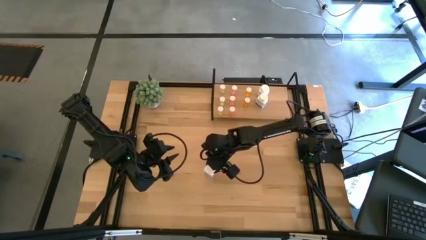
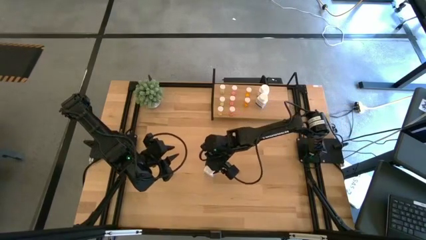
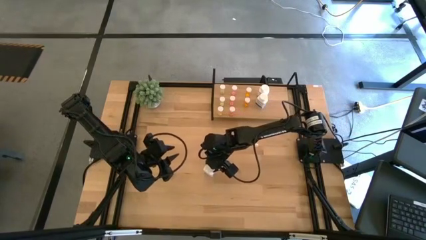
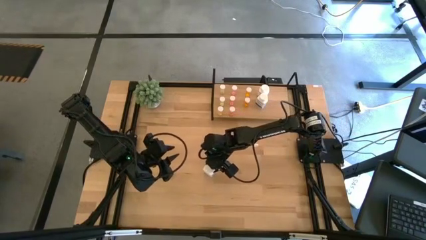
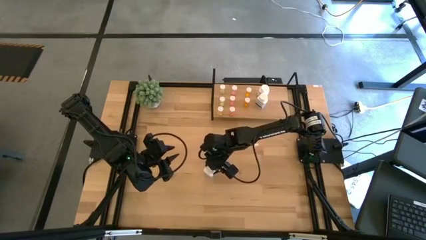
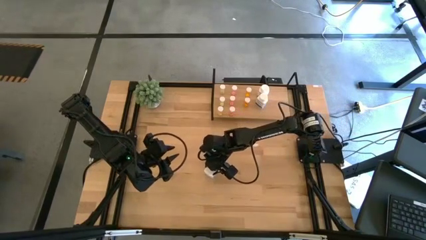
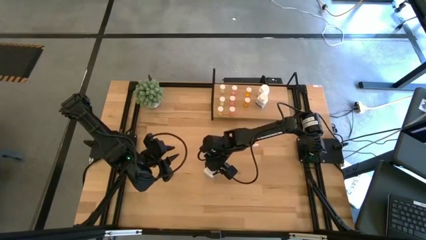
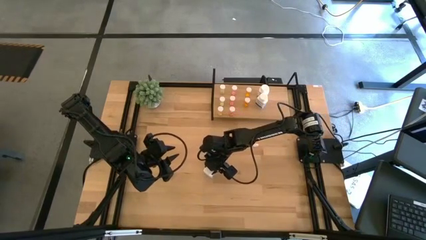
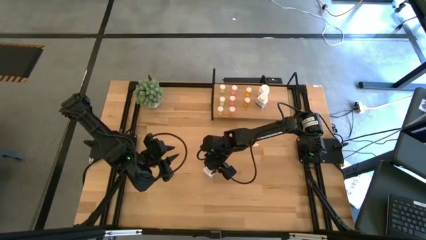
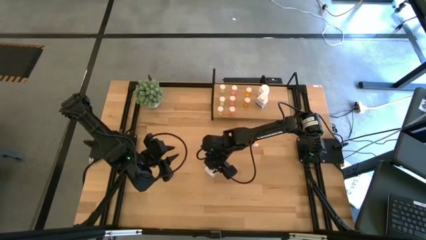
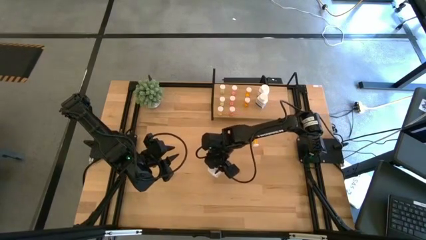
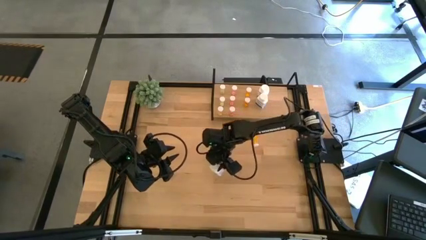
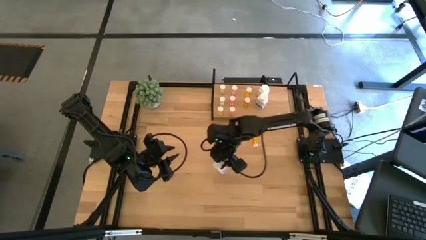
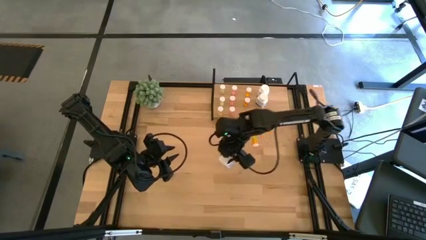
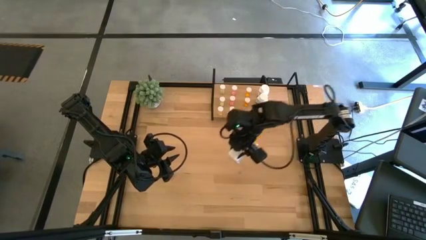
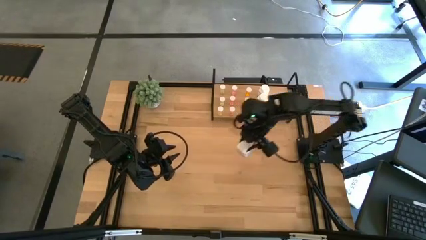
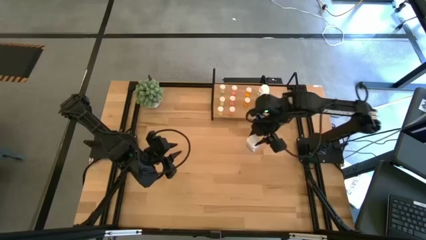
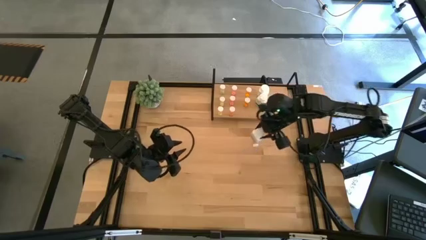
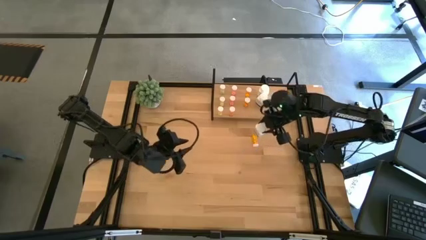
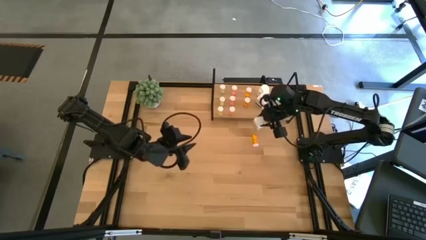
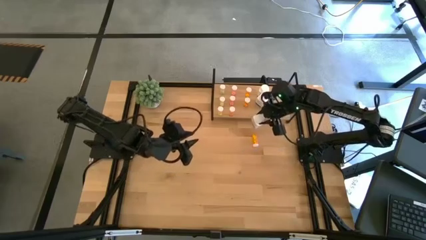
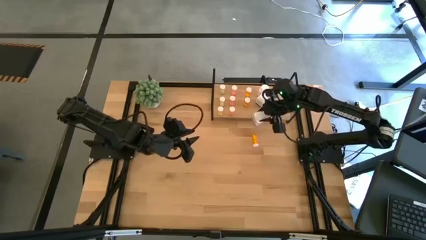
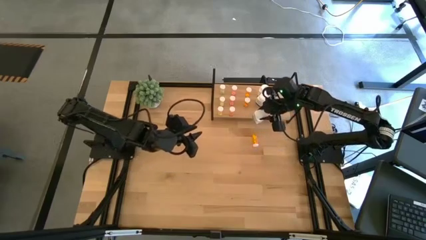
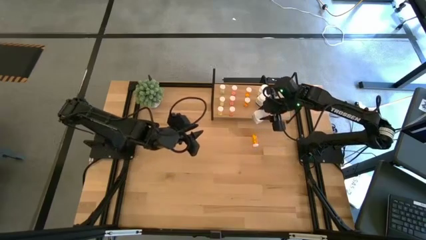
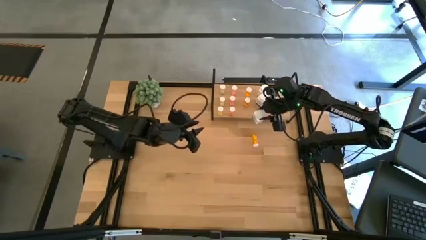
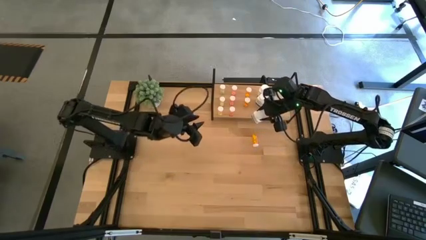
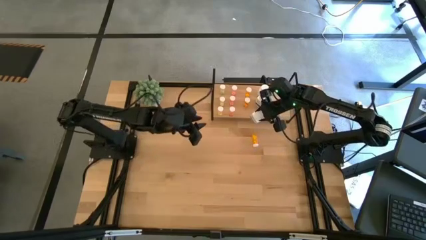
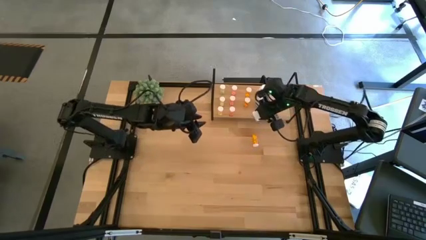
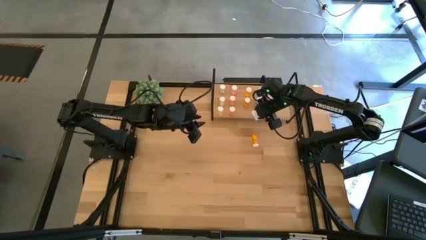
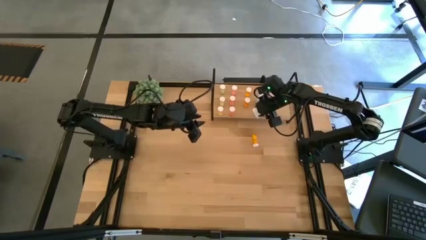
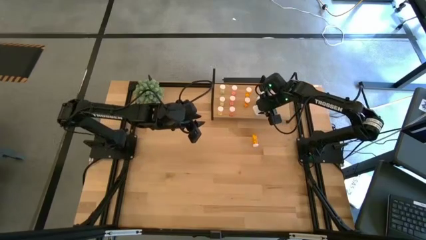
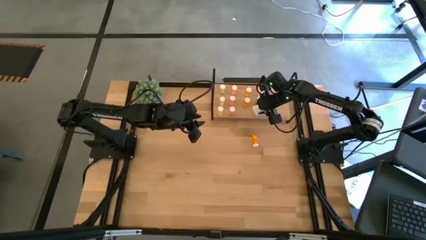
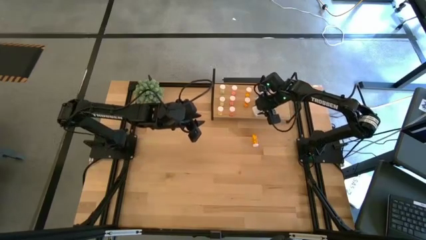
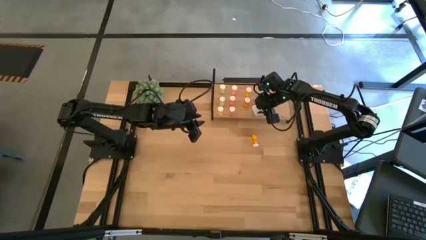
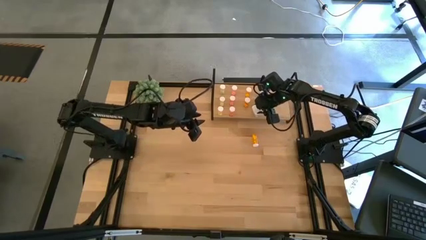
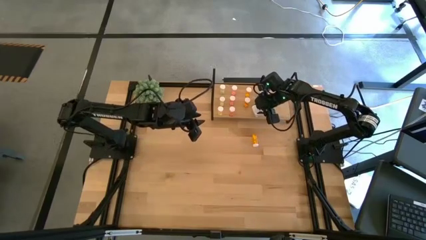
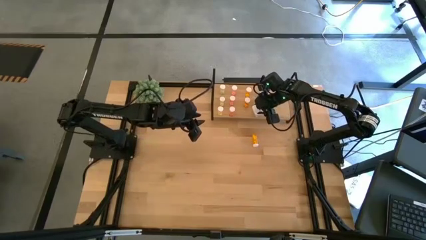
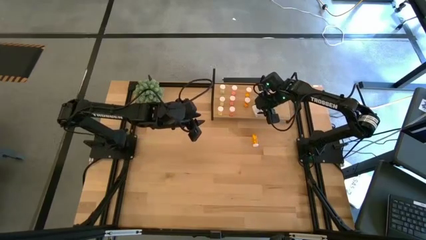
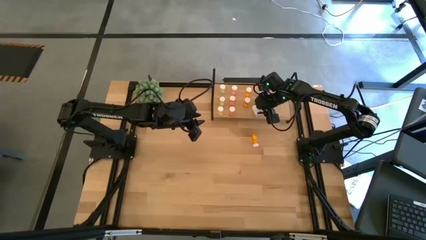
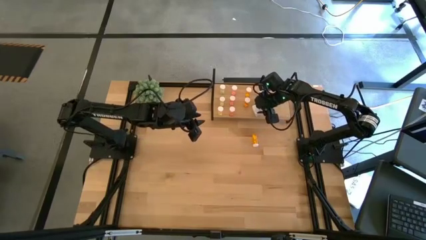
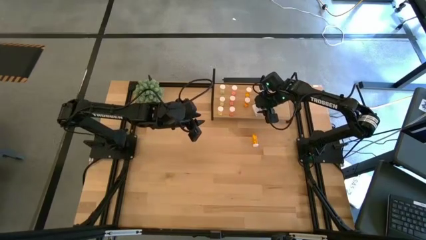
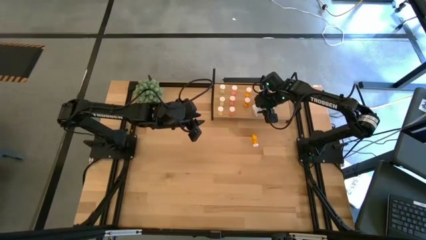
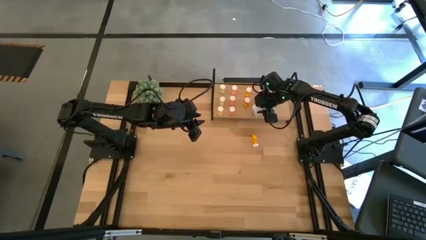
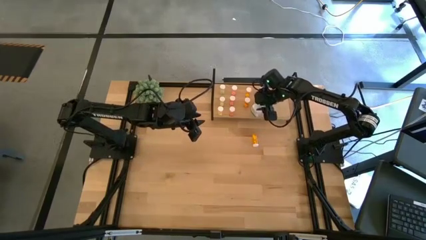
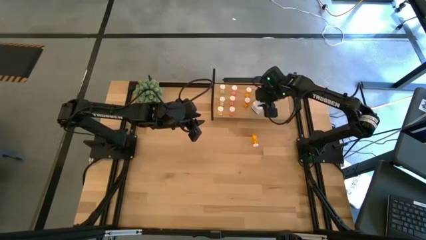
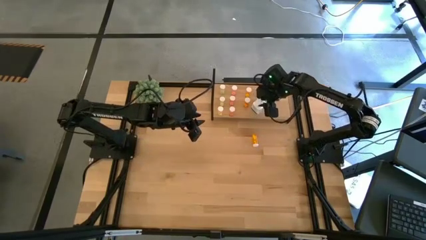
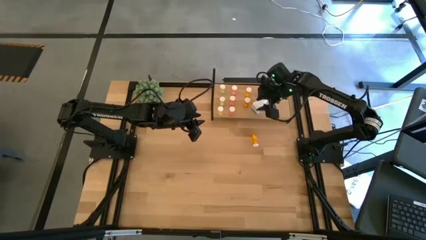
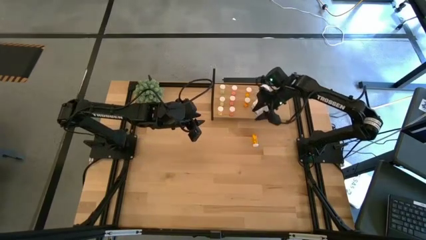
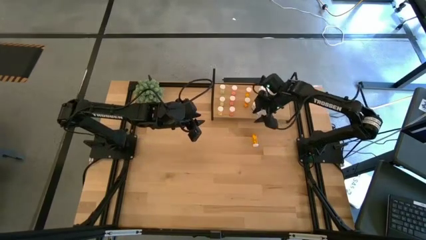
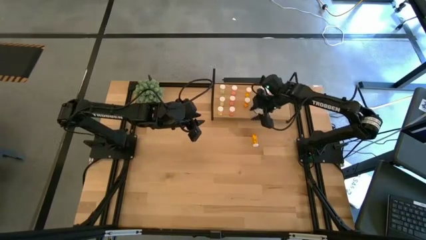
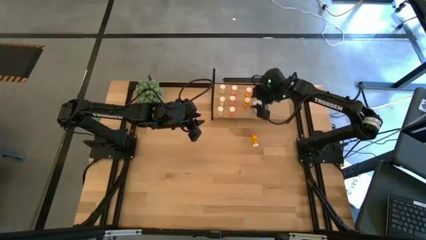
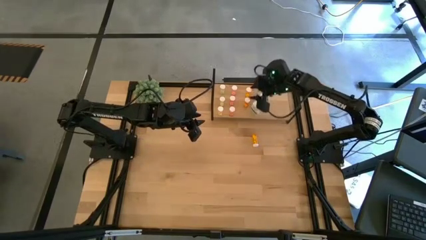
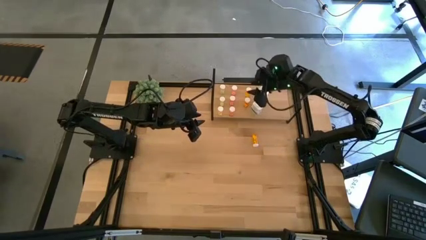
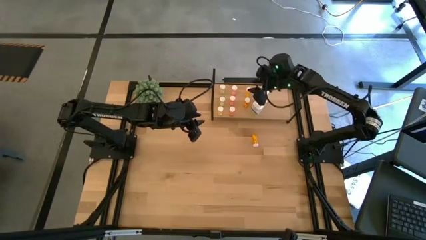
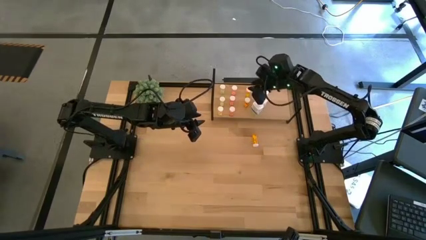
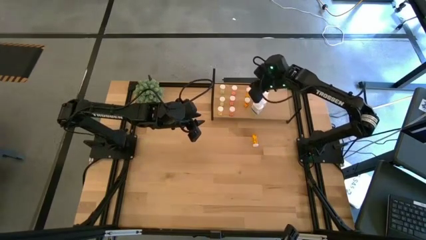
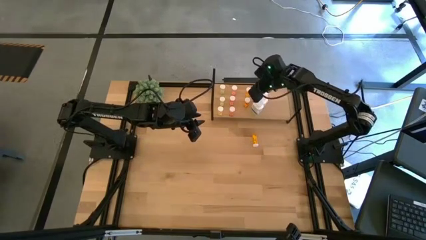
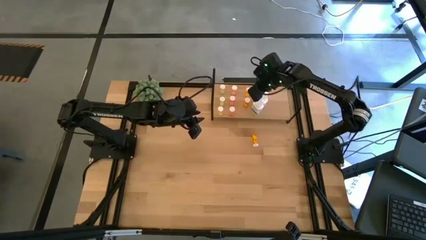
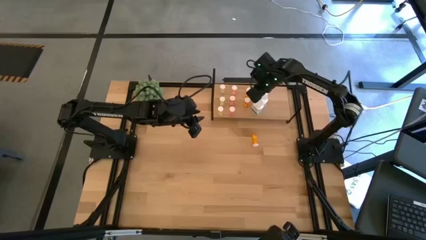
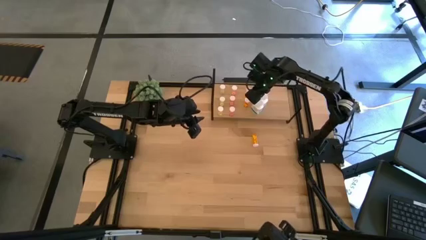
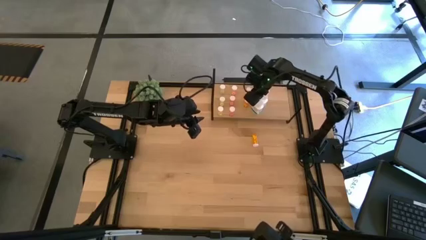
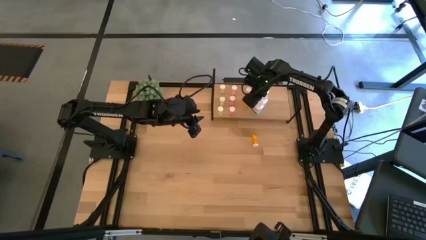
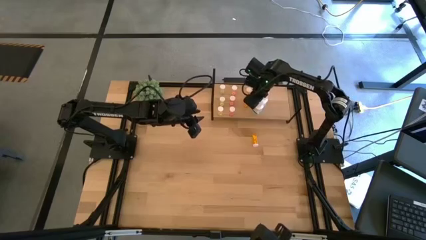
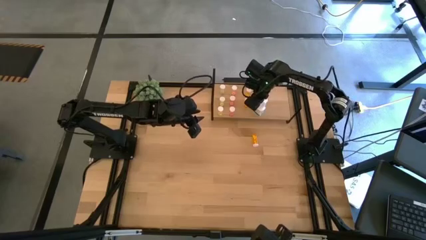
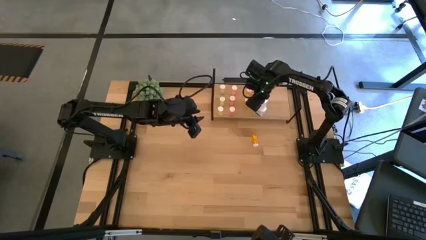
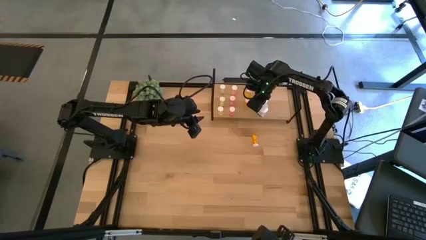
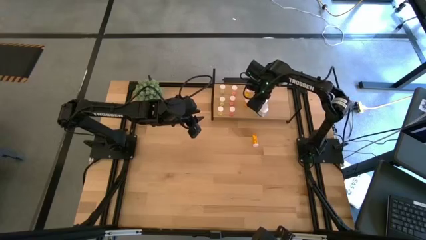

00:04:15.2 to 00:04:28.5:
Task: Pick and place medicine bottles onto shelf by color
Put the white pill bottle on the shelf aligned with the other white pill bottles

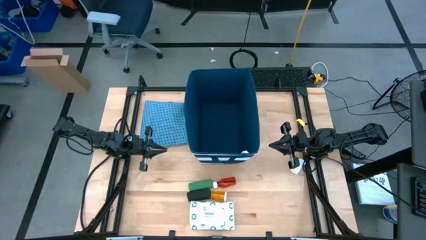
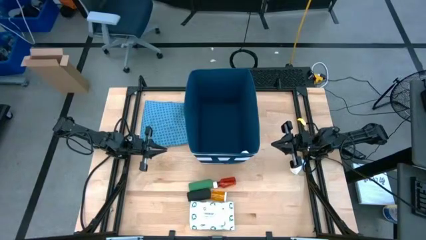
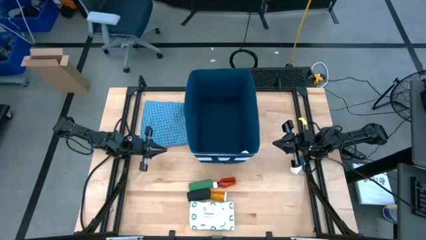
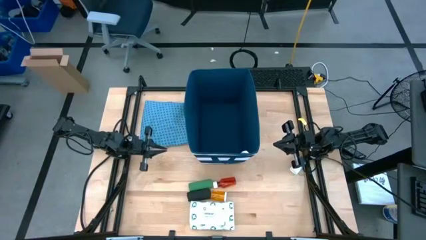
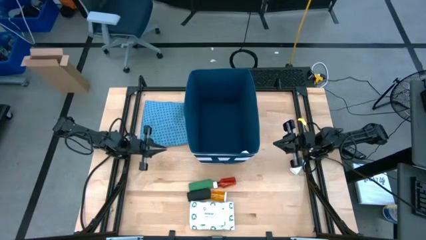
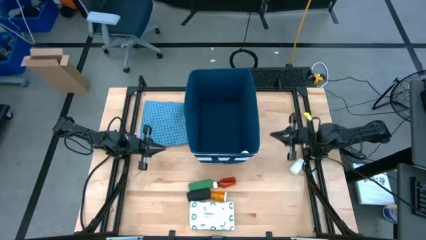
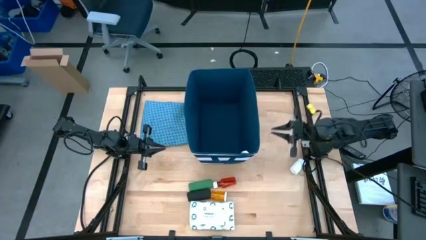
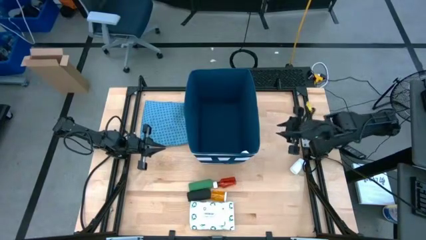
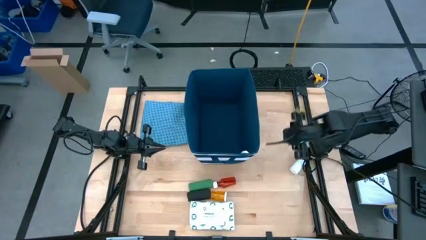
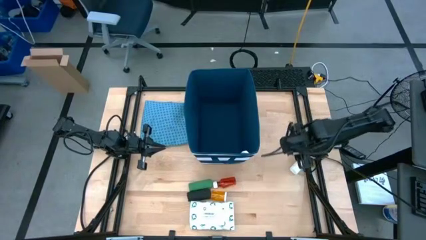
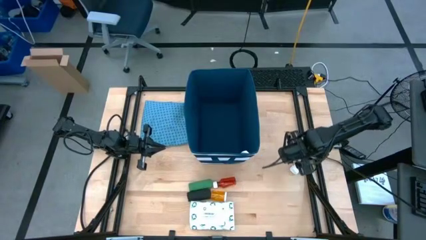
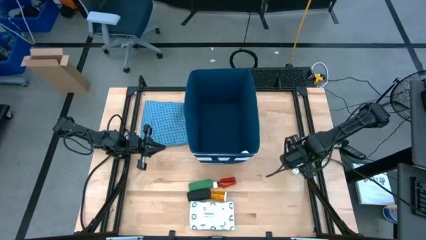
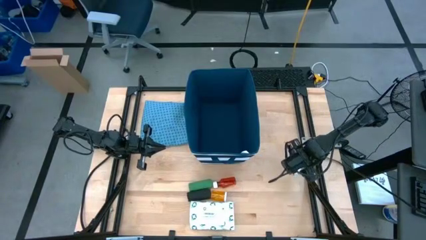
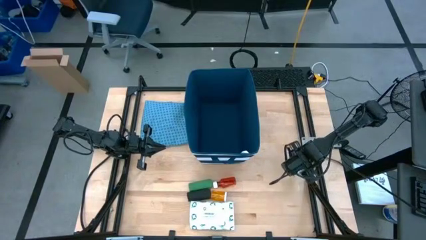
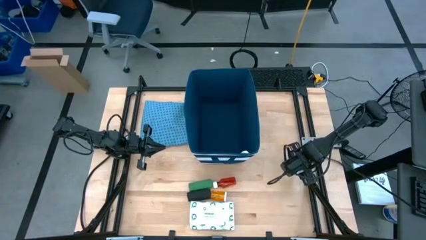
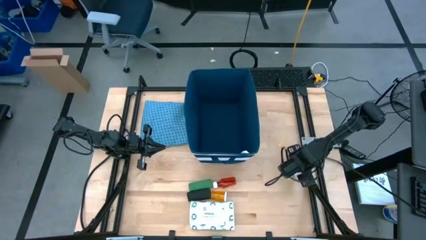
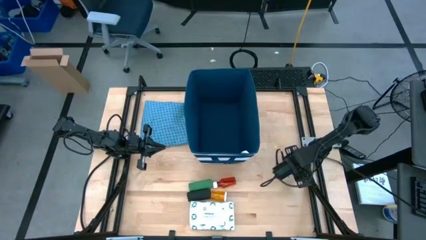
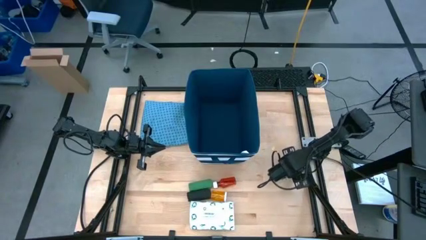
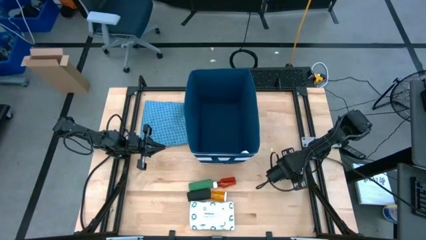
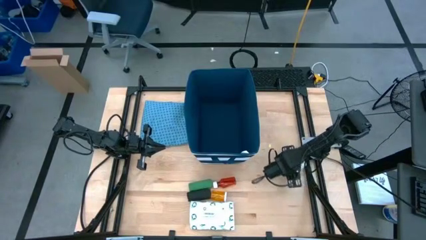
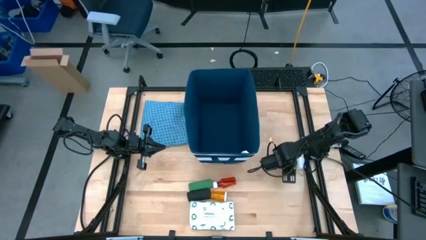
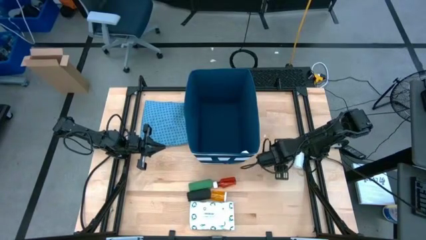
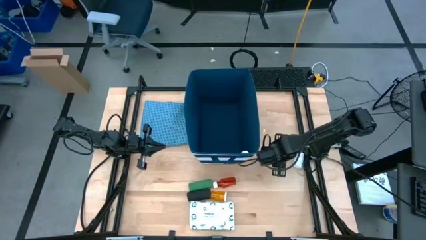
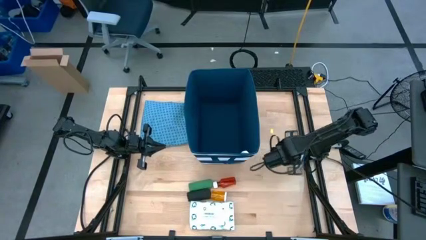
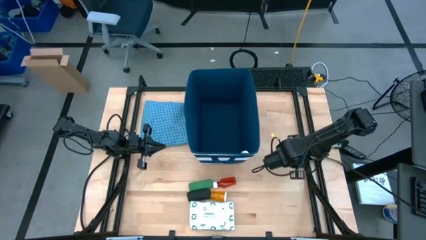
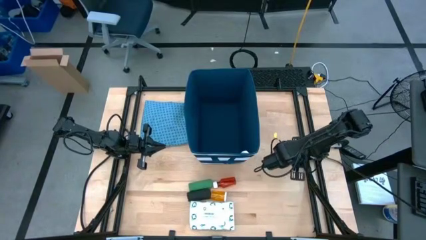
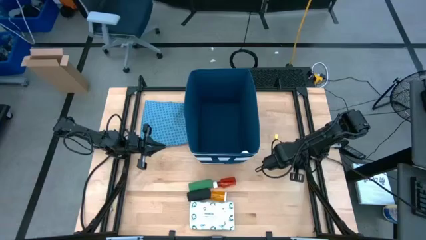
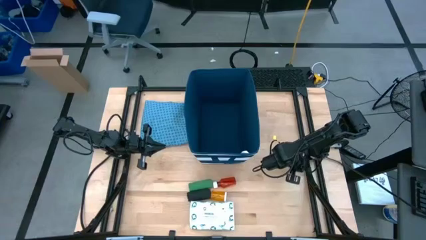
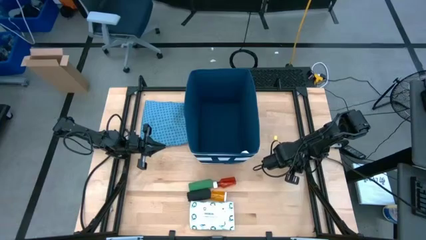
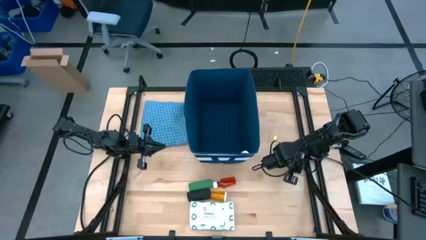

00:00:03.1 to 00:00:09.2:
Task: Pick & place medical supplies in basket/bin
Put the white pill bottle into the blue bin
